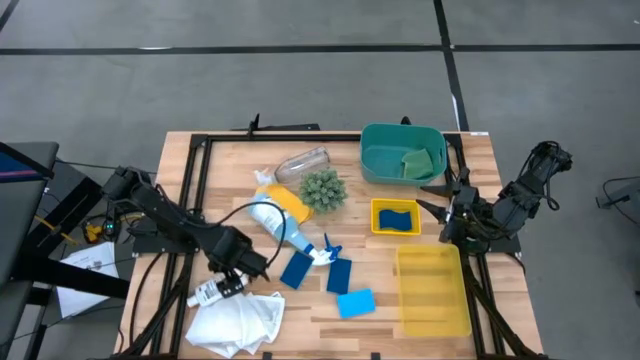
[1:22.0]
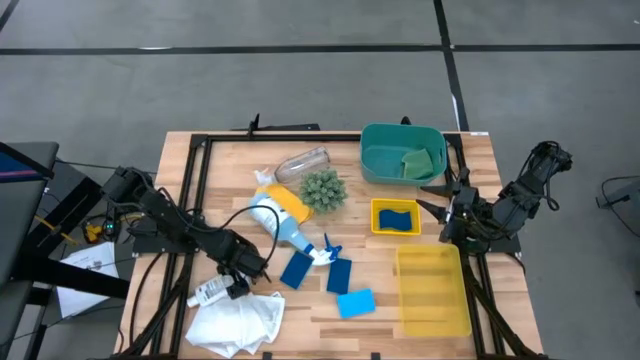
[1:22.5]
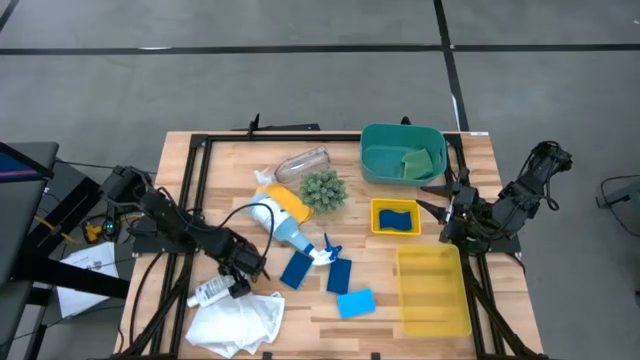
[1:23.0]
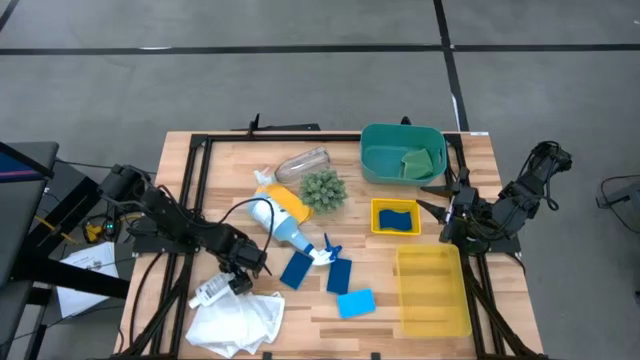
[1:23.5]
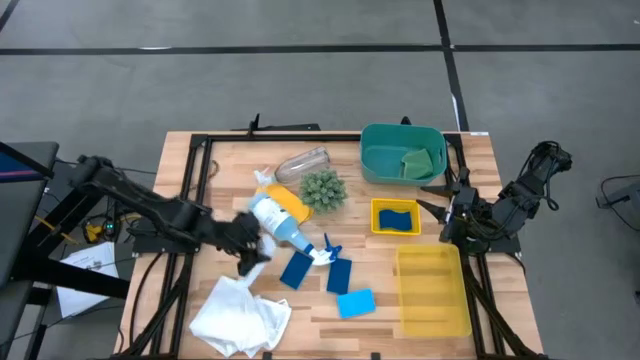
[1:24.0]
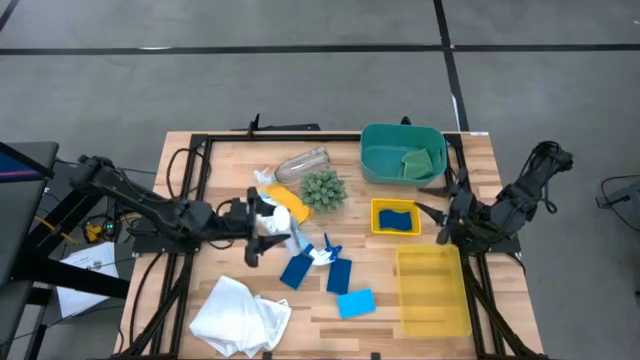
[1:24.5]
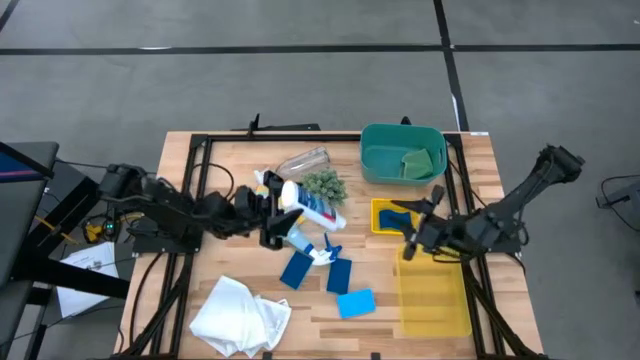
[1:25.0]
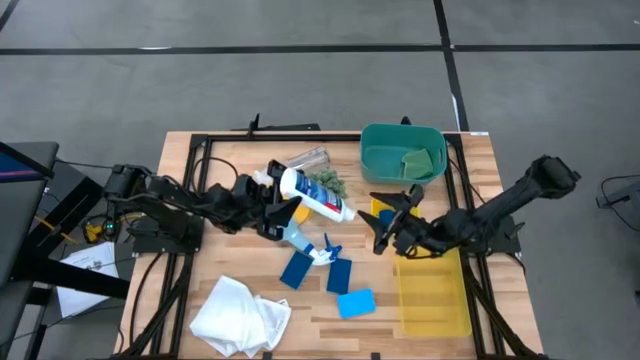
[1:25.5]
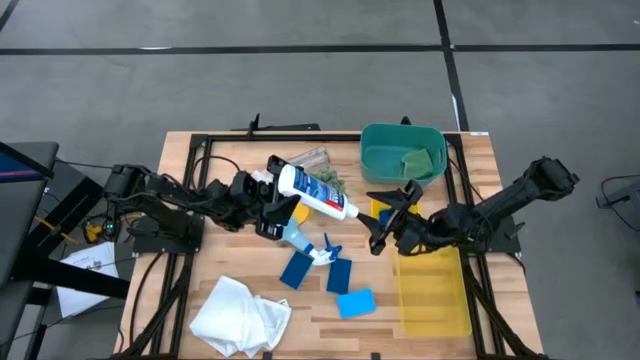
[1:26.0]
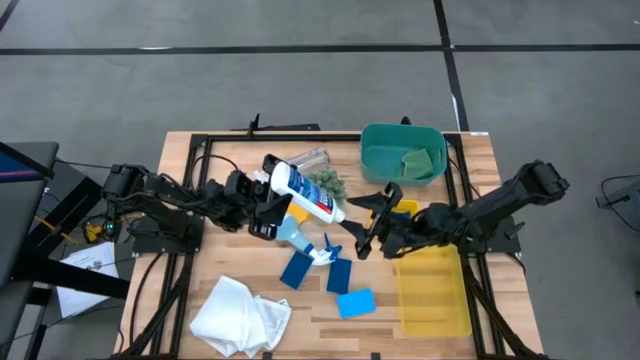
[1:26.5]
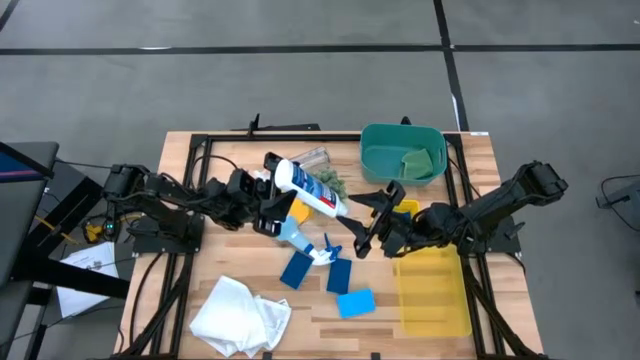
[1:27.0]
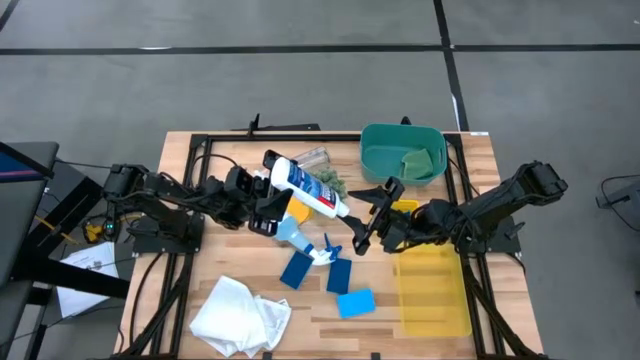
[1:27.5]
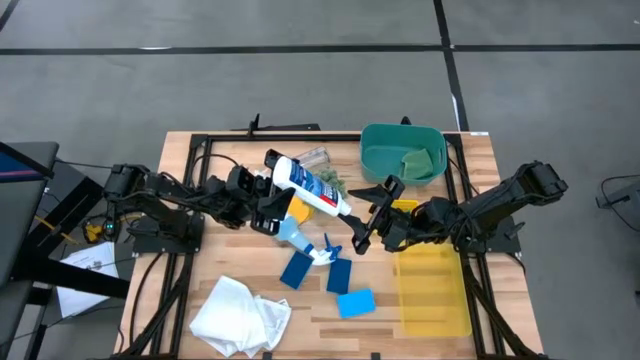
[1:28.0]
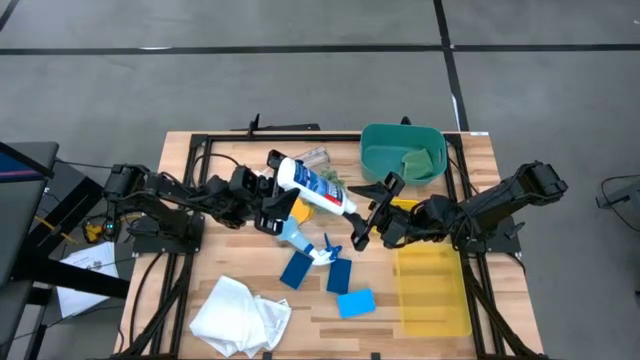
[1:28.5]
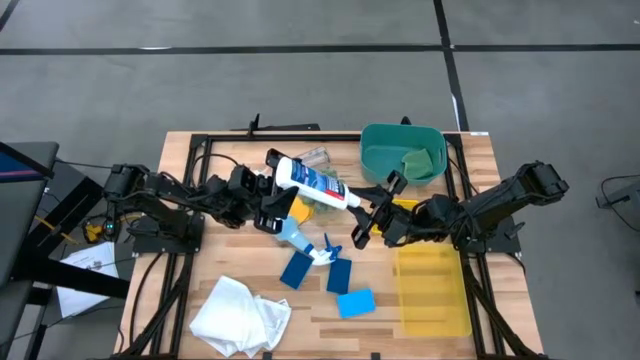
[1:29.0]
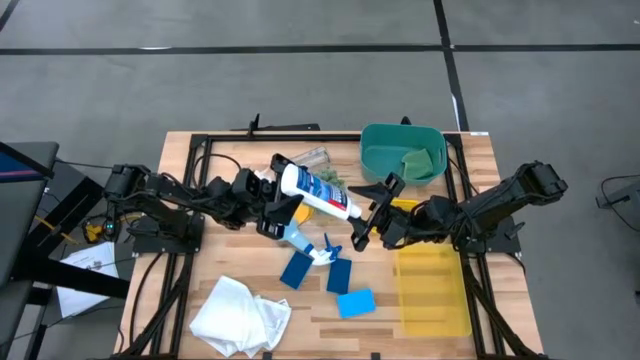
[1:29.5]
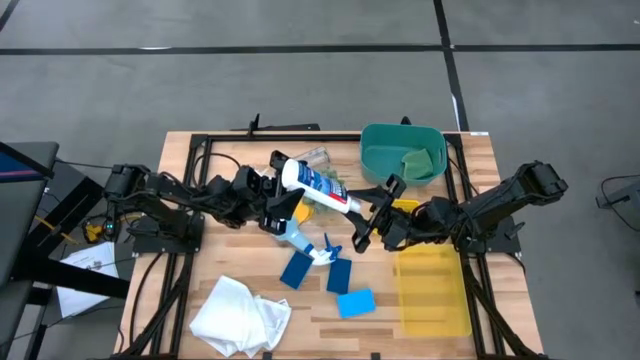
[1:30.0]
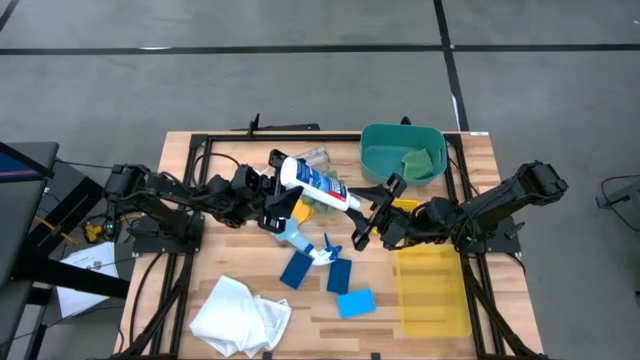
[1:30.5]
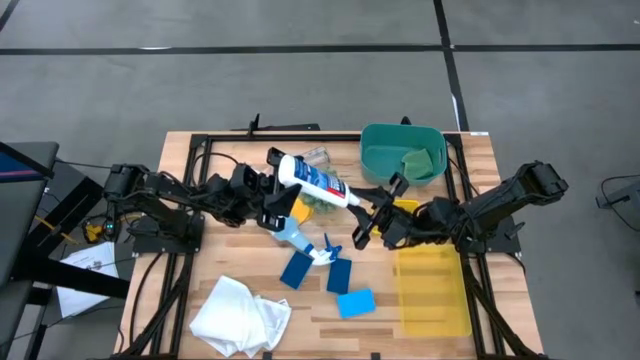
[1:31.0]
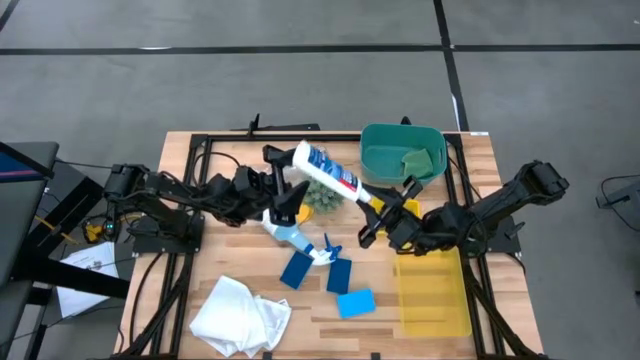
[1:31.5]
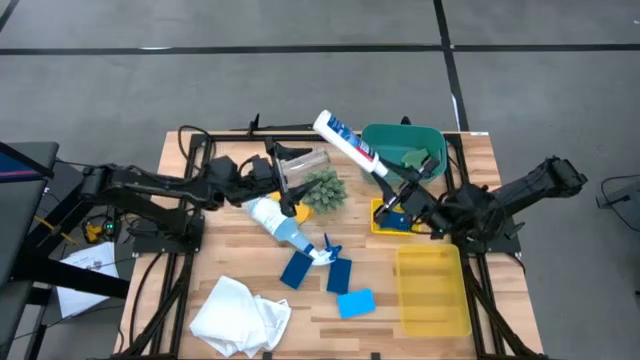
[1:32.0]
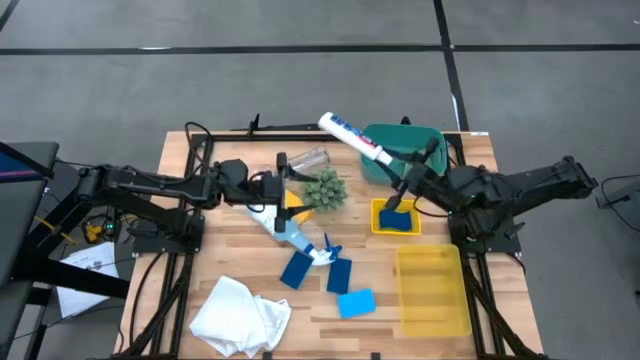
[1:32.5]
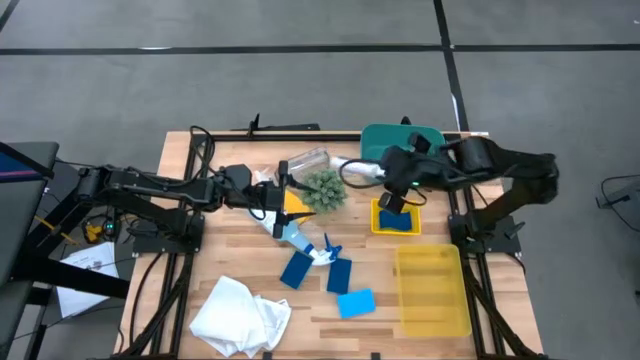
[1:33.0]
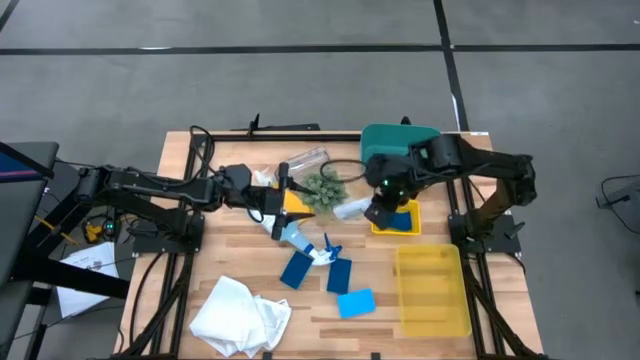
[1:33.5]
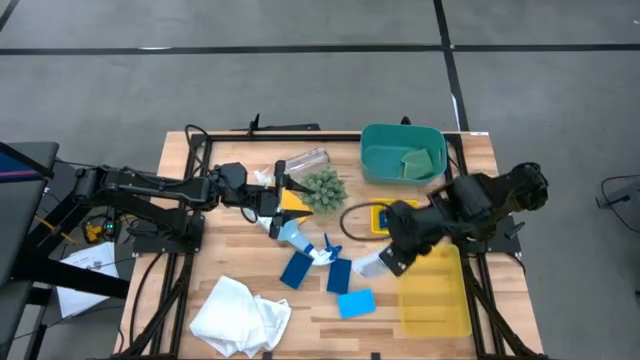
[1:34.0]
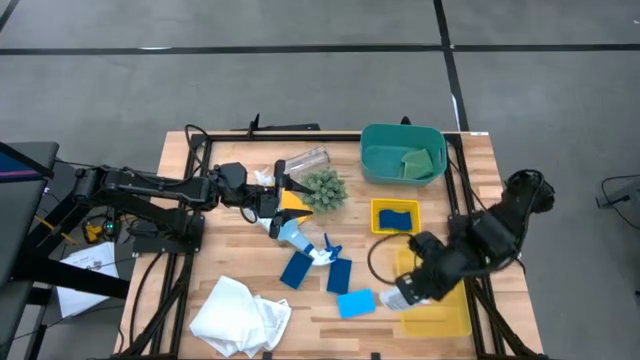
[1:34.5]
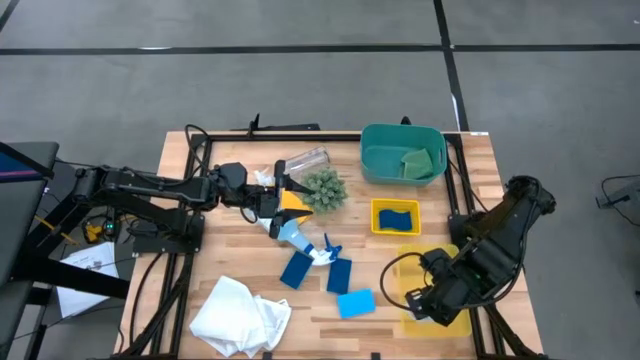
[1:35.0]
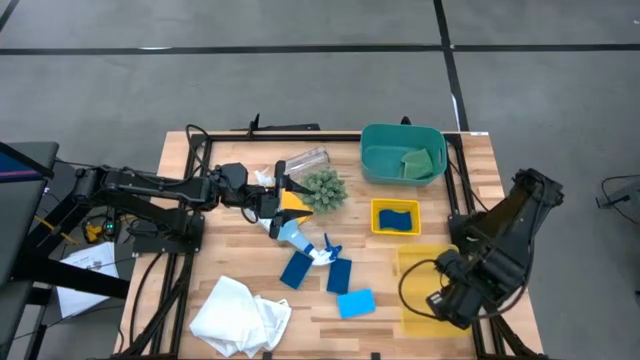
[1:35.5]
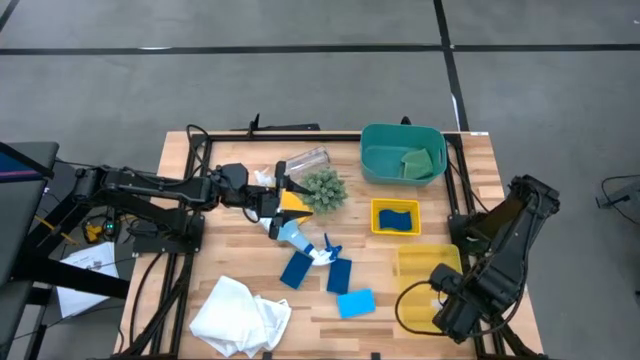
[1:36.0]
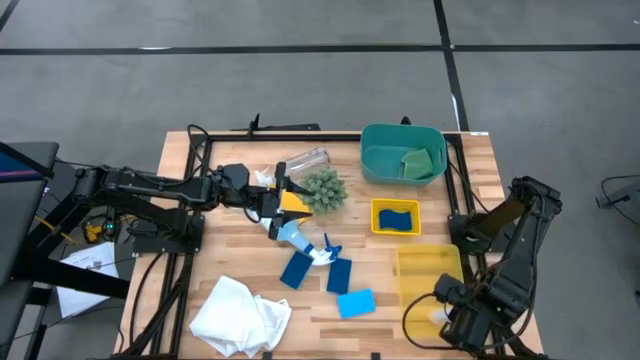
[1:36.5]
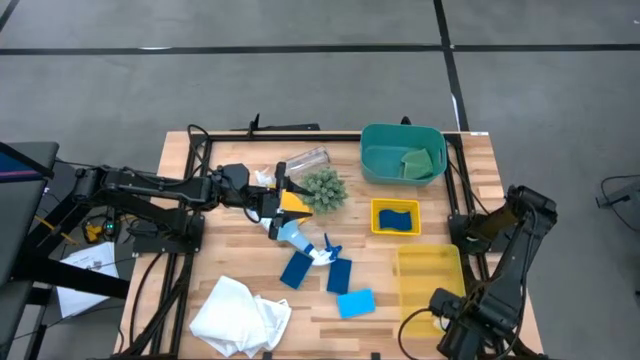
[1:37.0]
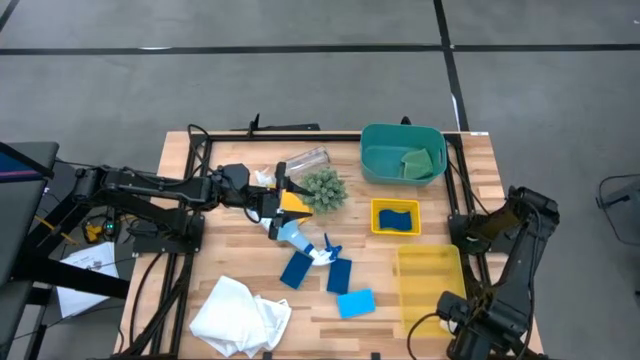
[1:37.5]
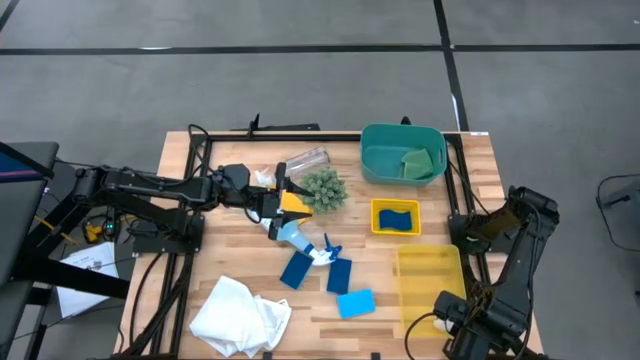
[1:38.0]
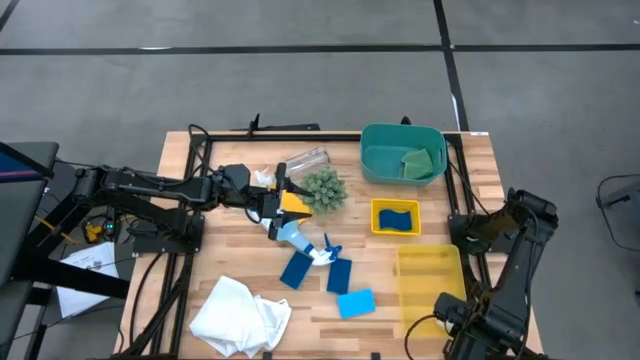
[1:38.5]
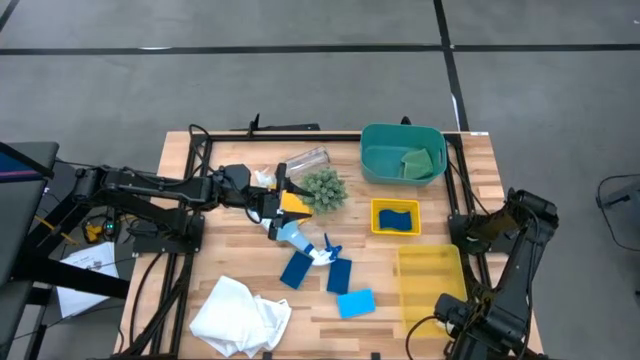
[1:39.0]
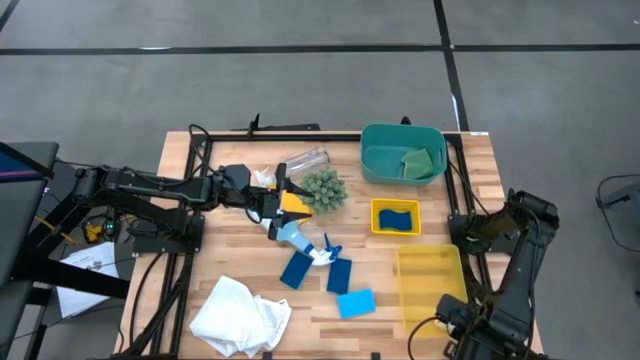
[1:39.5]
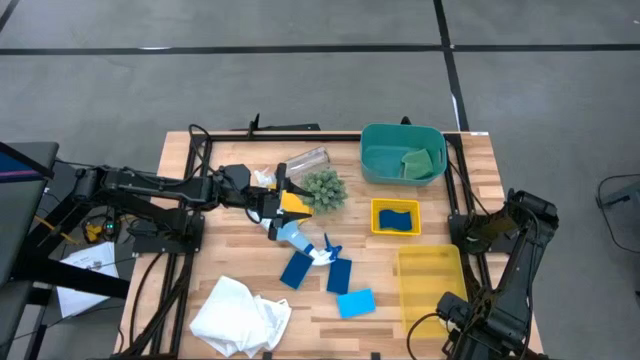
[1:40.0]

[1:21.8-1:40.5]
Task: Pick & Place Kitchen Items
Put the white bottle into the yellow bin

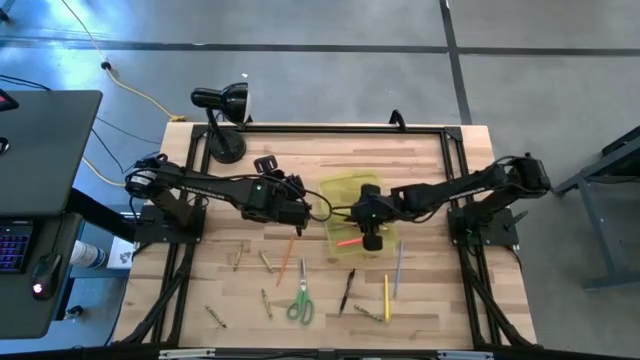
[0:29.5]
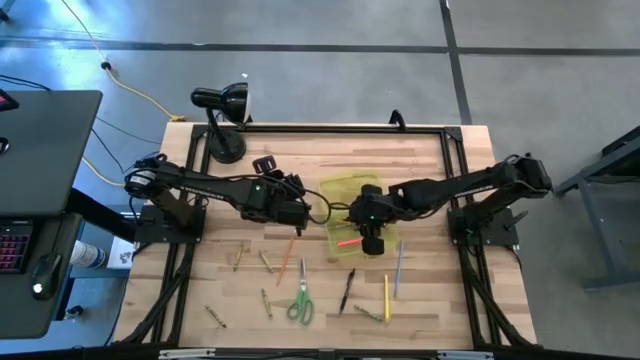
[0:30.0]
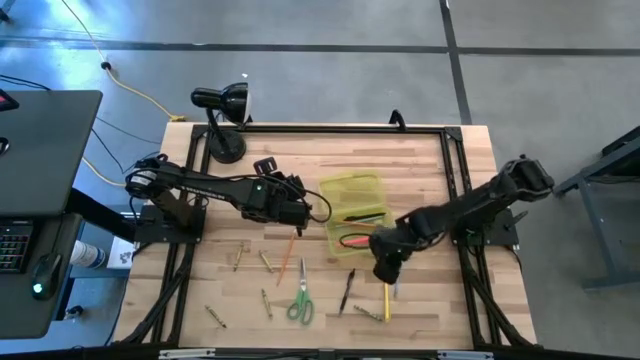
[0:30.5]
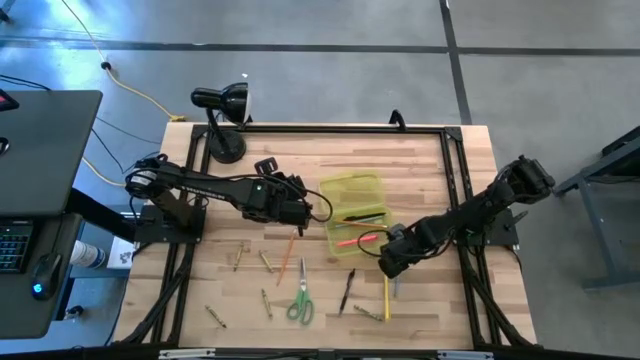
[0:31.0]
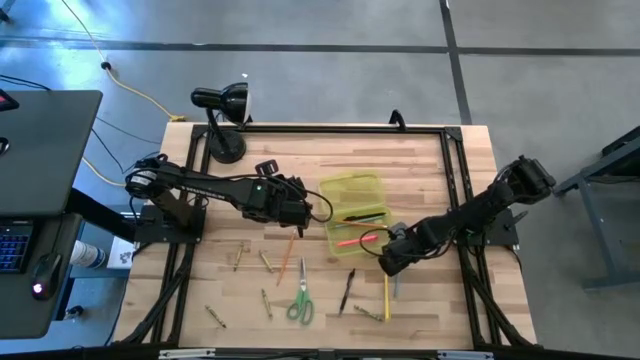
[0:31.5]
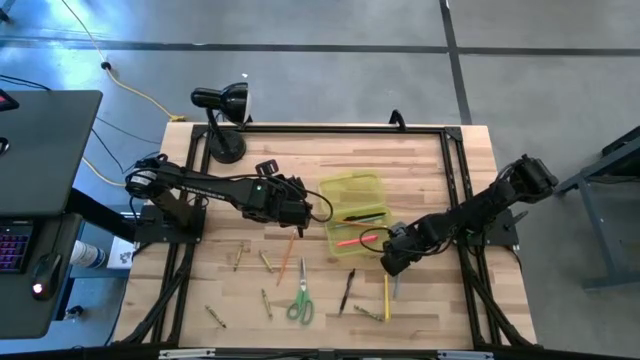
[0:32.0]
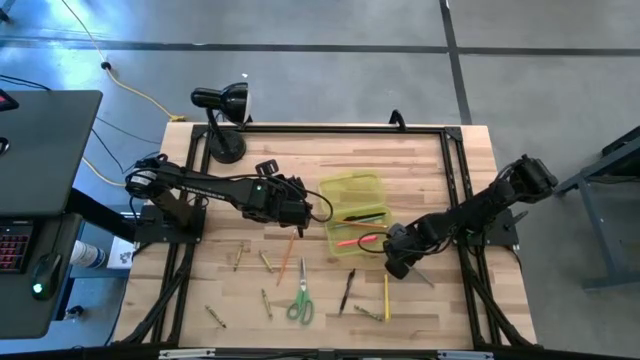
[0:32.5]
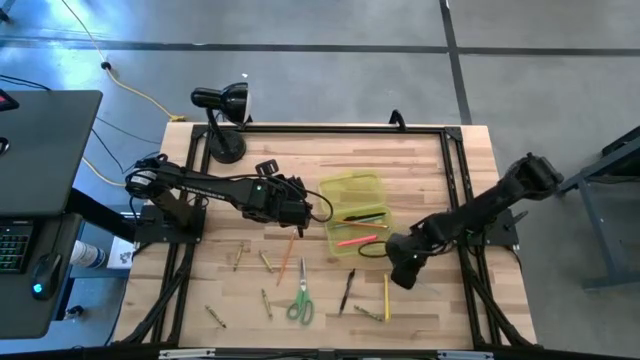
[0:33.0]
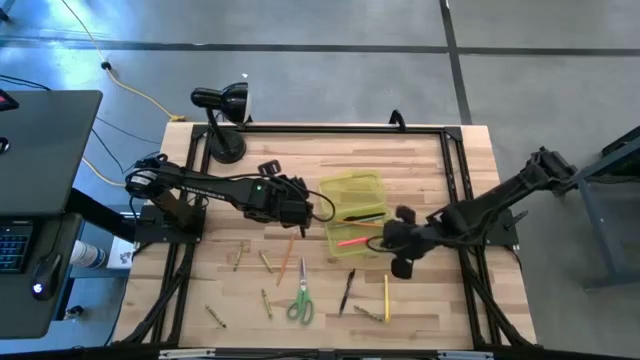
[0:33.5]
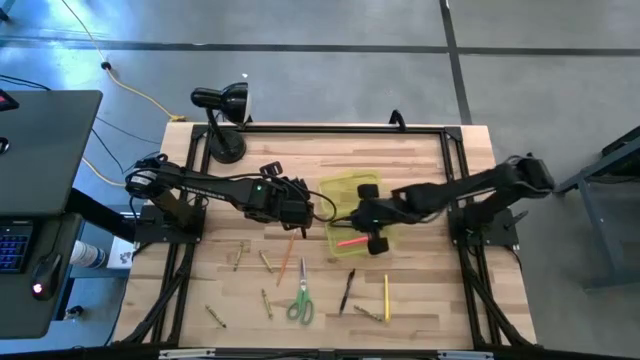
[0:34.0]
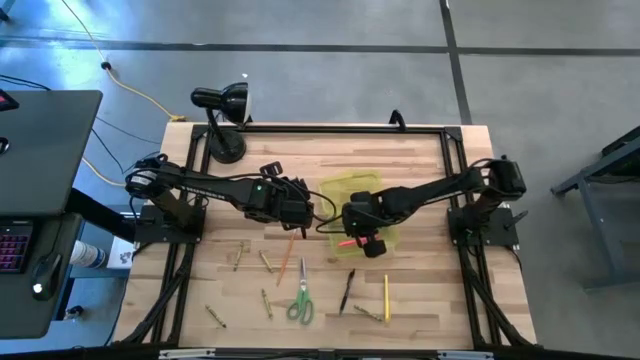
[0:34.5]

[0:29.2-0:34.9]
Task: Pick & place school supplies into a supply box
Put the blue pencil into the yellow supply box
